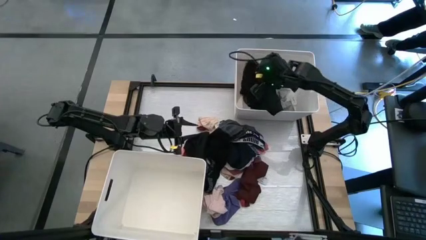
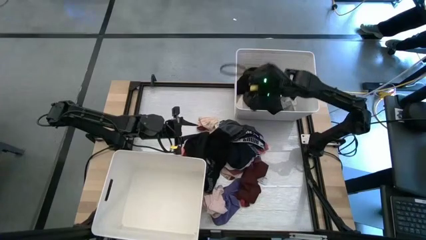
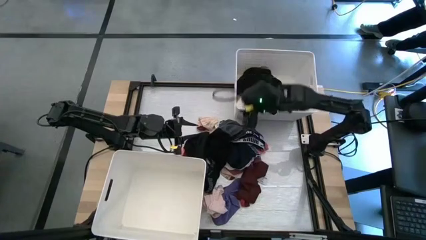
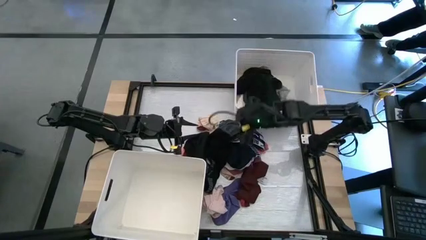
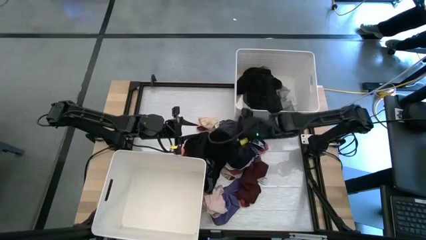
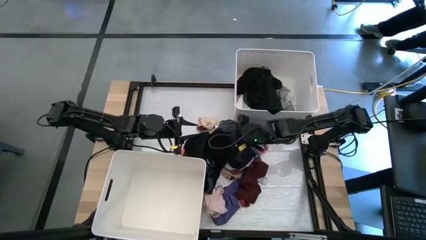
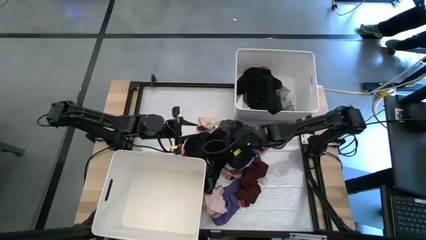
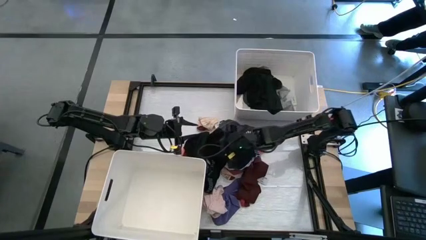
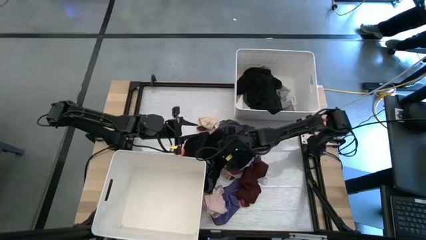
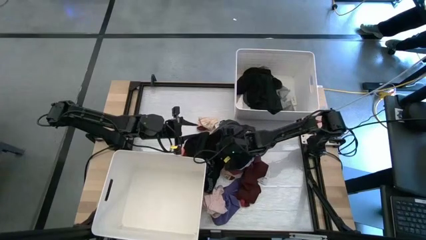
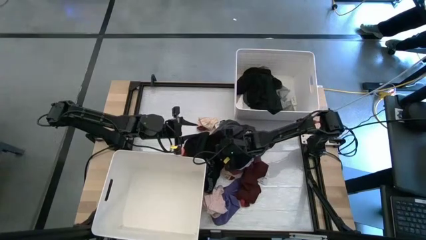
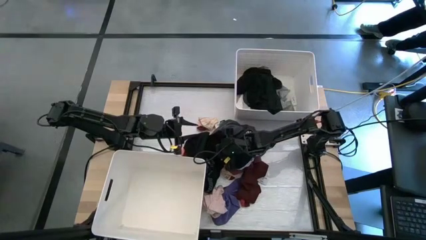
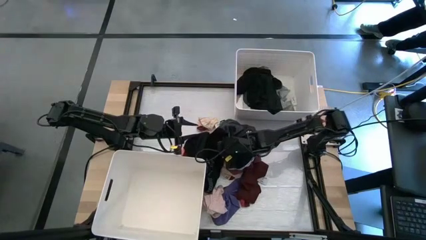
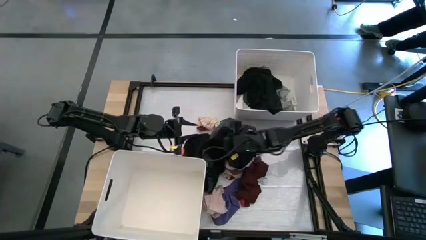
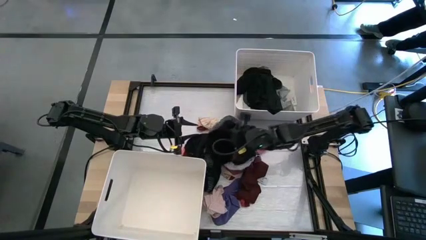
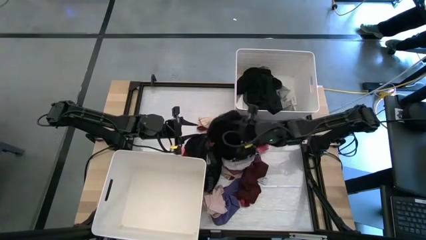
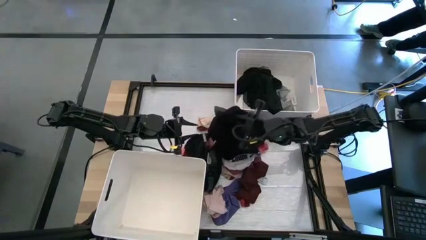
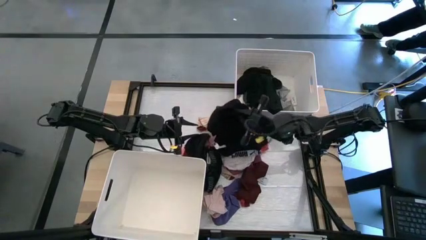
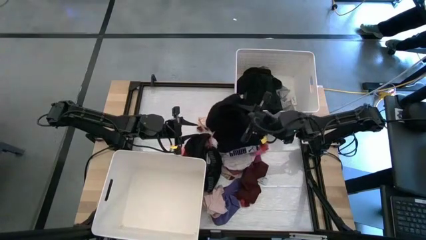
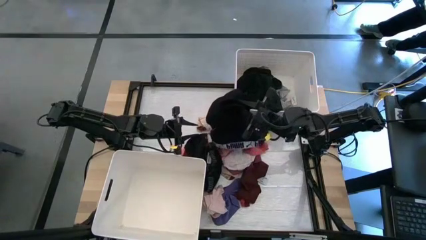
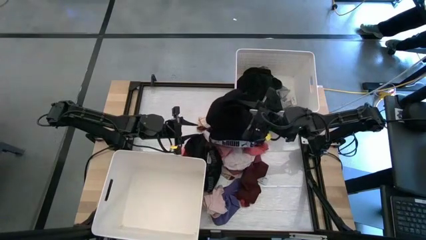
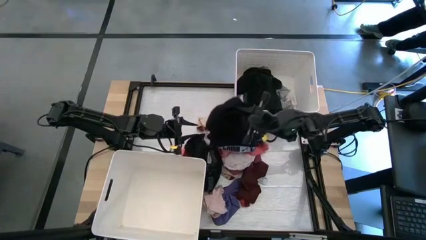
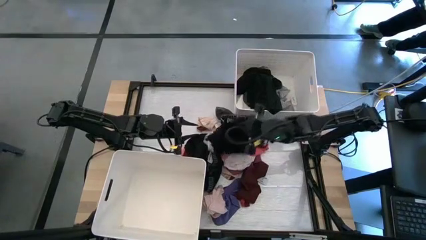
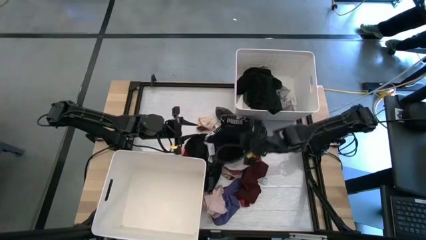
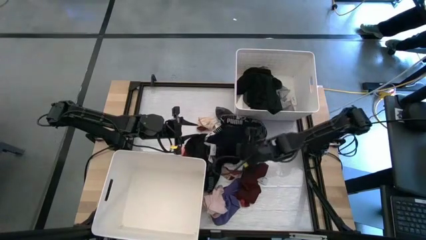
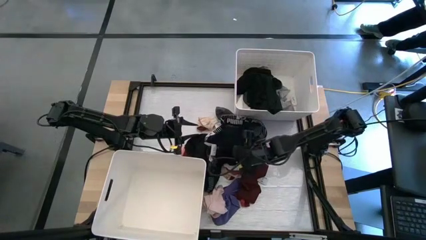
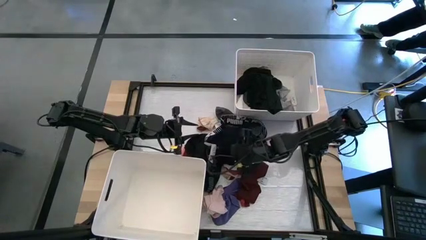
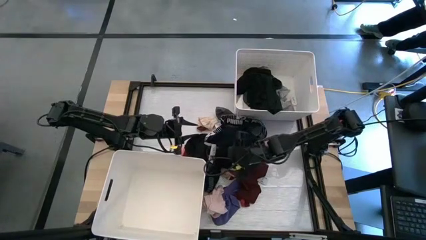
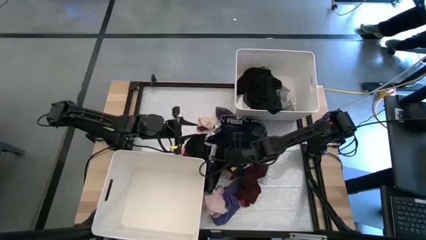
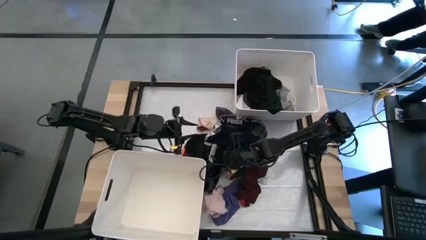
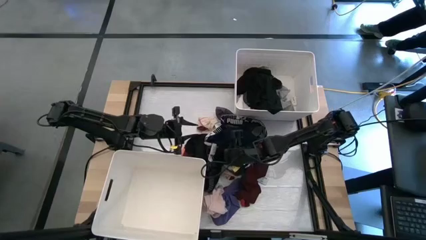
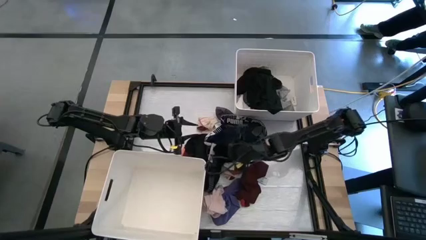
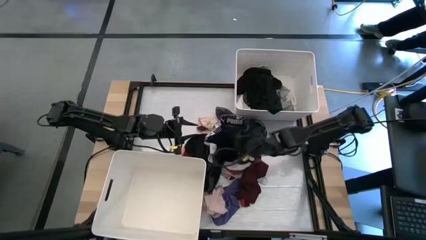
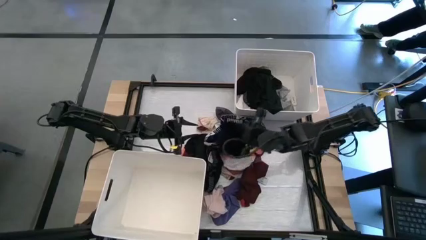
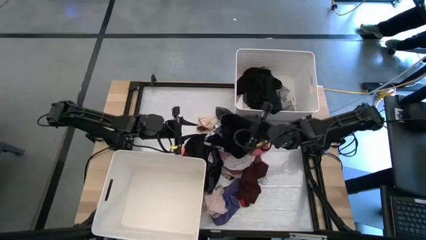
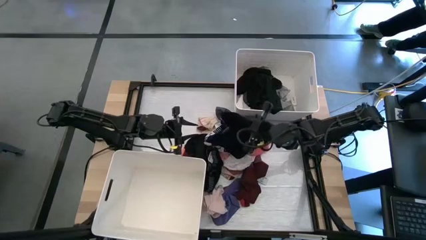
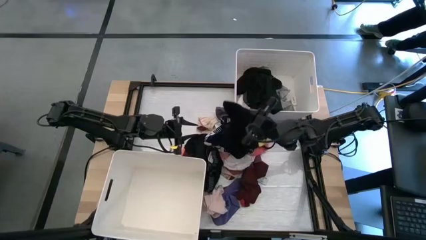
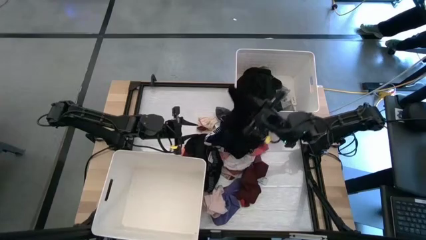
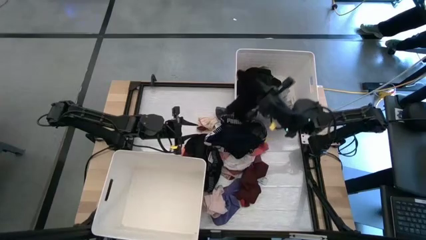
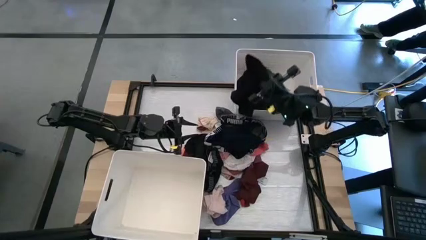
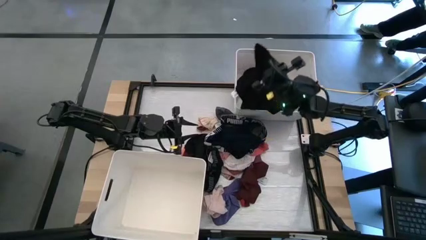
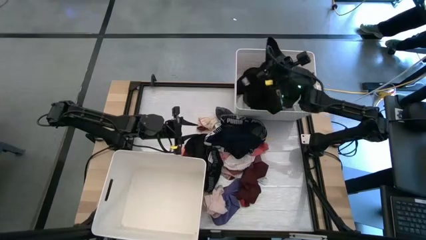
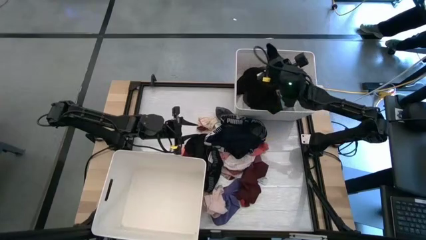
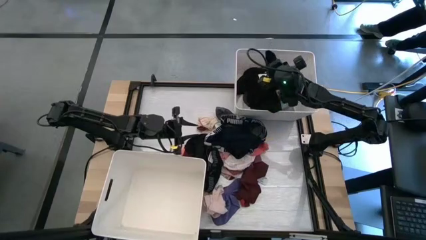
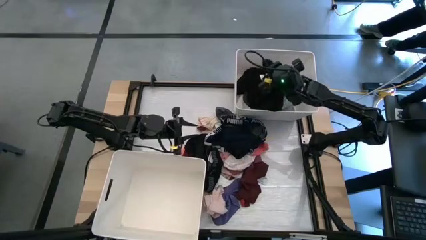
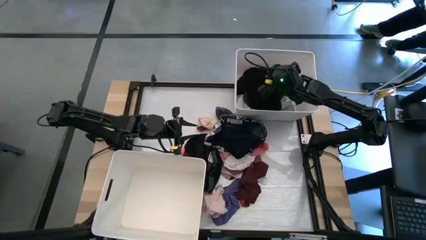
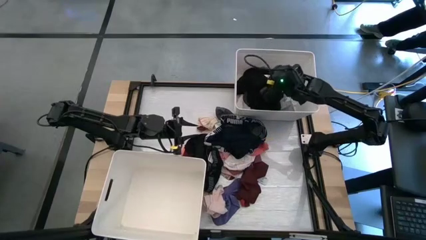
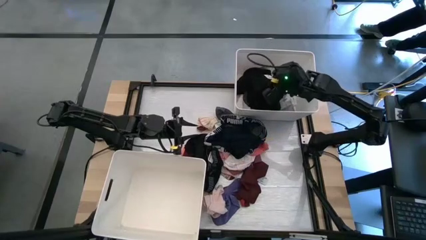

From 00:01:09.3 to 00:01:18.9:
Task: Sort clothes
Put the black underwear into the top white laundry bin

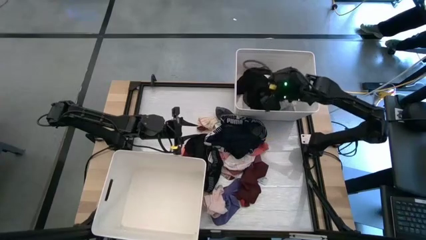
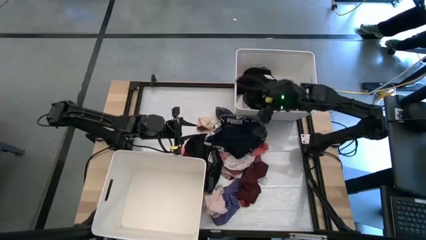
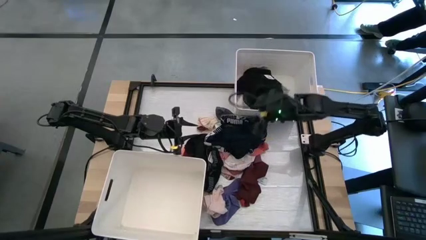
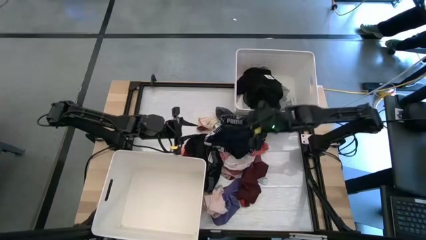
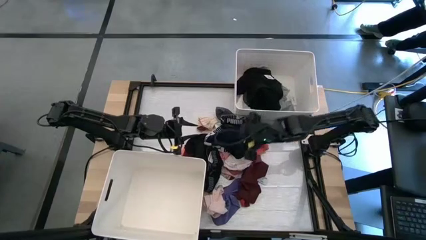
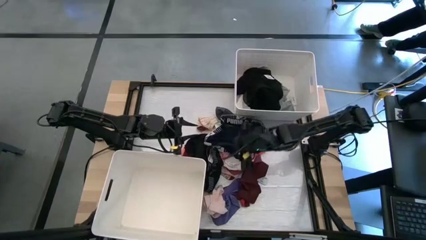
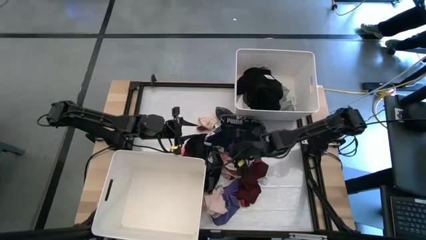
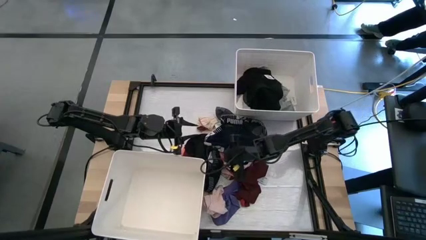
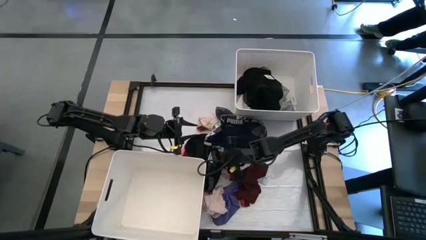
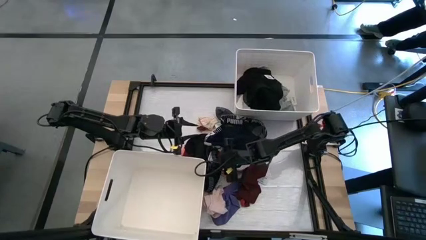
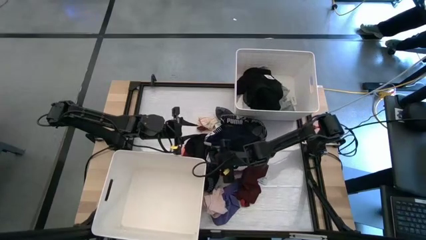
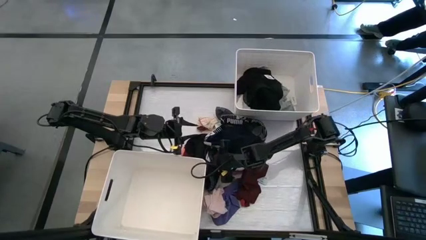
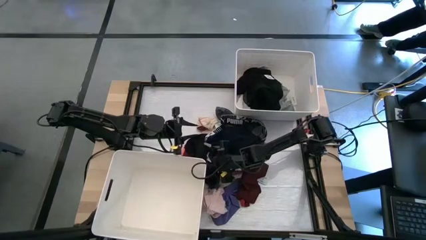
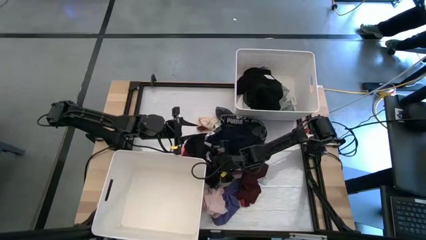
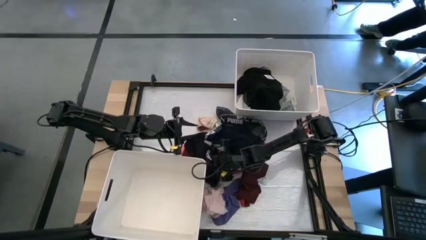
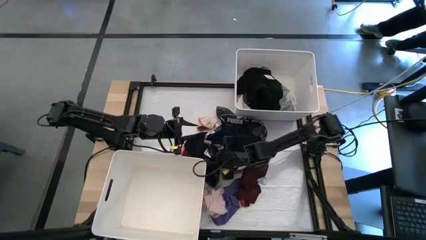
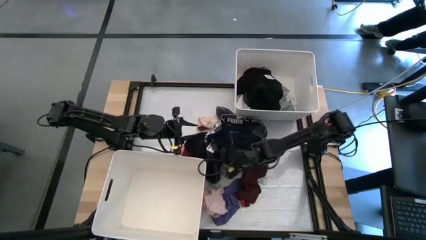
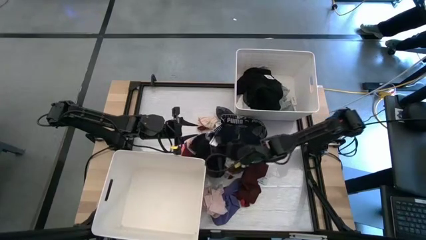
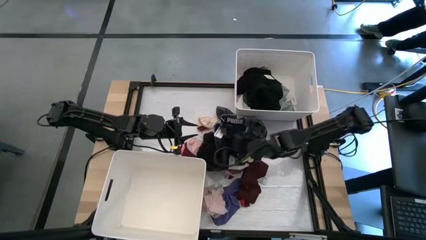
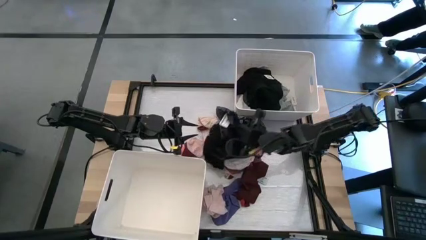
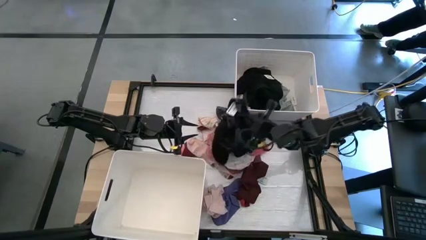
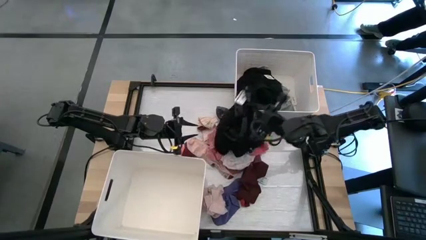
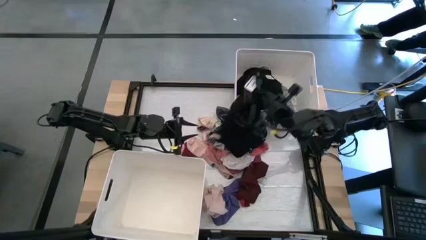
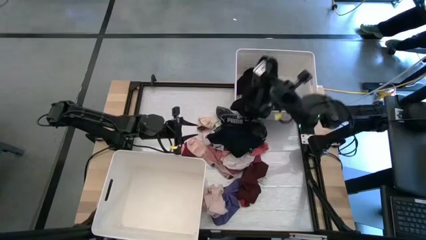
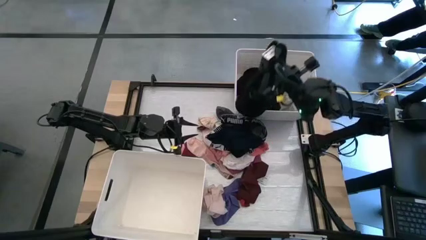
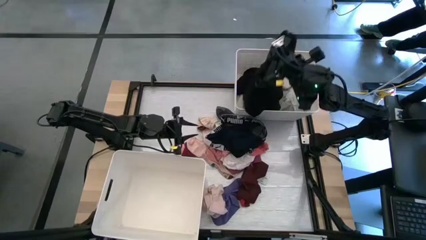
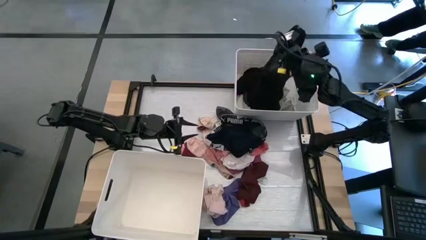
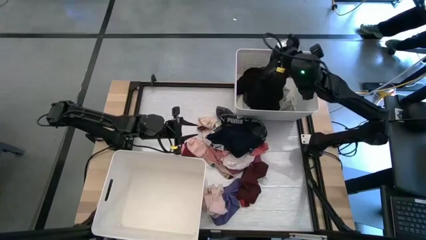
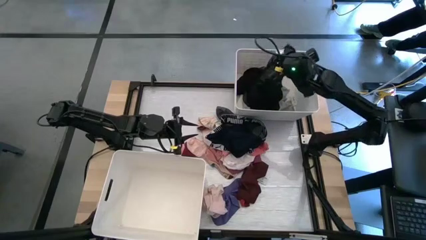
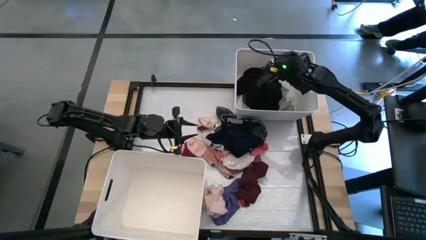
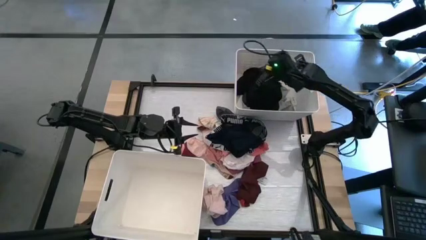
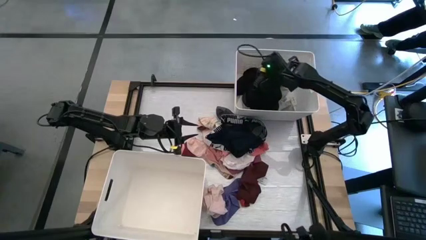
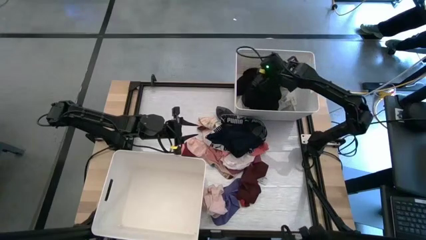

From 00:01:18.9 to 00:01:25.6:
Put the black underwear into the top white laundry bin
